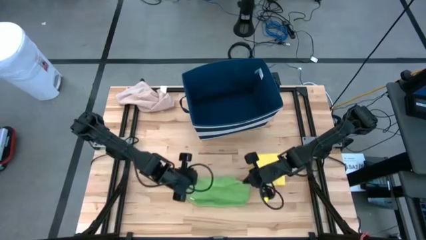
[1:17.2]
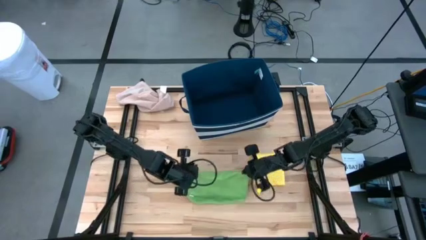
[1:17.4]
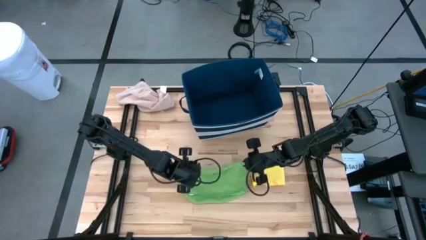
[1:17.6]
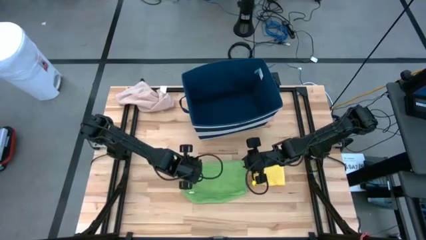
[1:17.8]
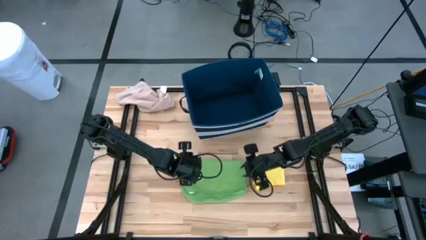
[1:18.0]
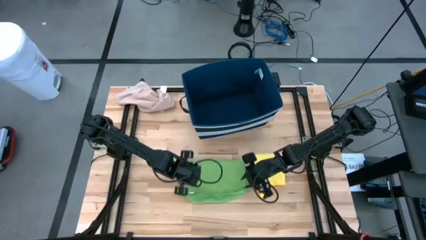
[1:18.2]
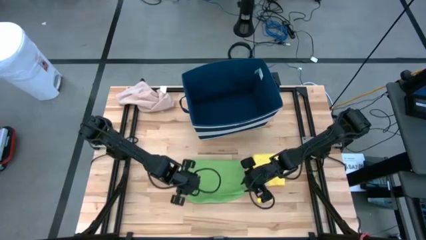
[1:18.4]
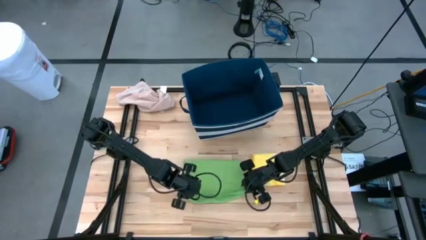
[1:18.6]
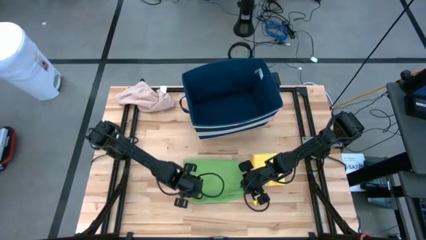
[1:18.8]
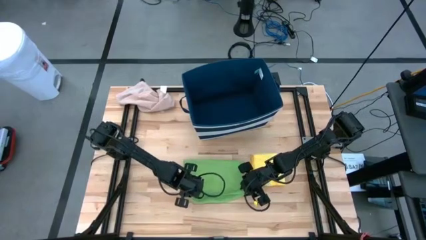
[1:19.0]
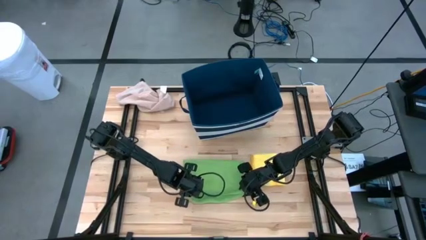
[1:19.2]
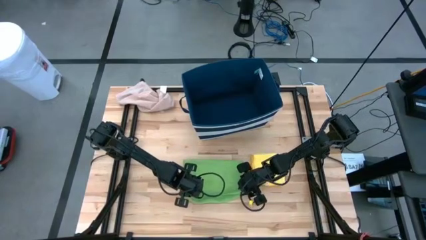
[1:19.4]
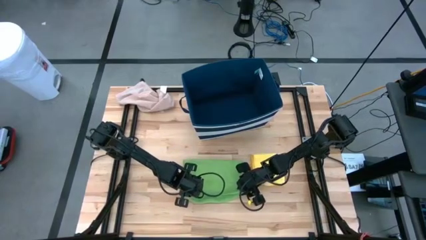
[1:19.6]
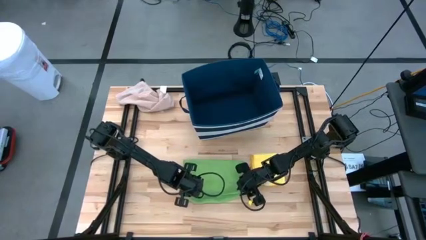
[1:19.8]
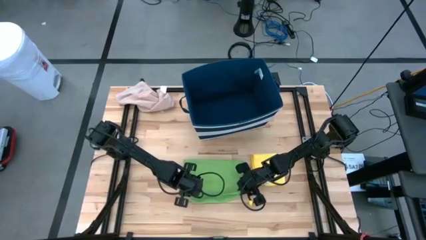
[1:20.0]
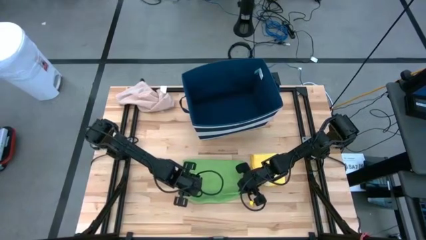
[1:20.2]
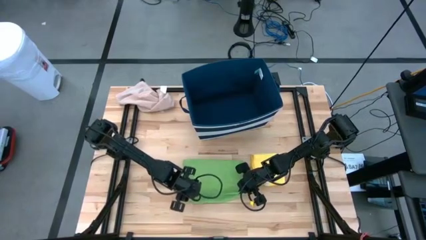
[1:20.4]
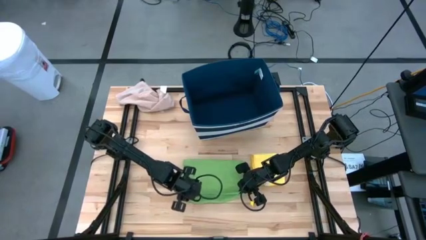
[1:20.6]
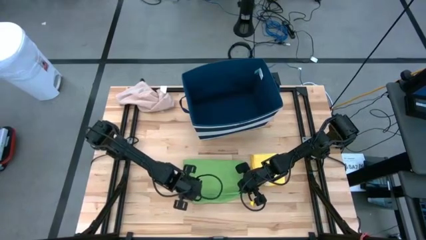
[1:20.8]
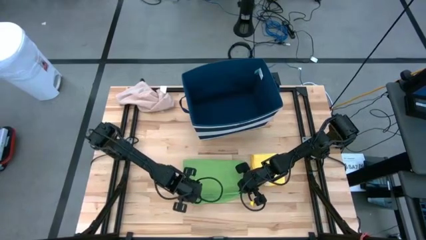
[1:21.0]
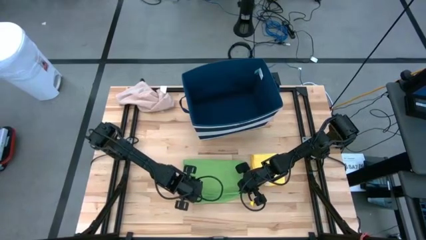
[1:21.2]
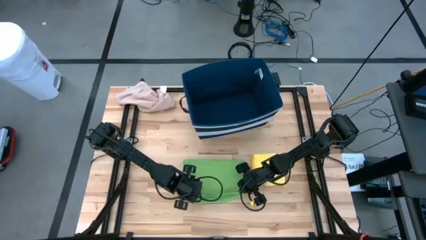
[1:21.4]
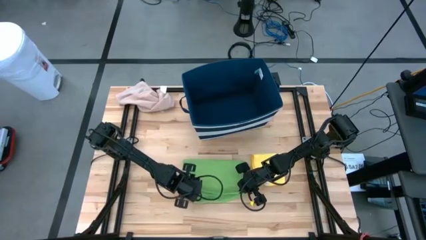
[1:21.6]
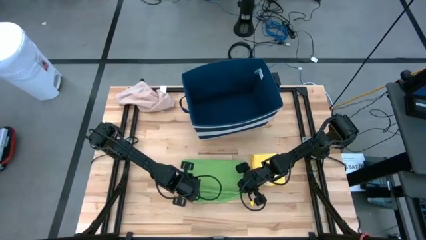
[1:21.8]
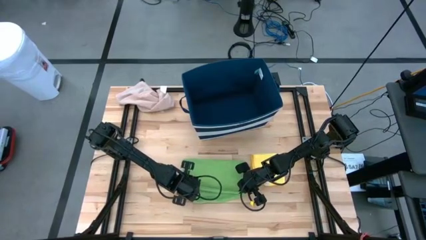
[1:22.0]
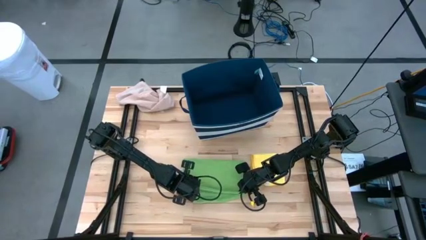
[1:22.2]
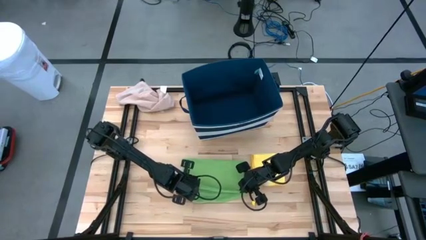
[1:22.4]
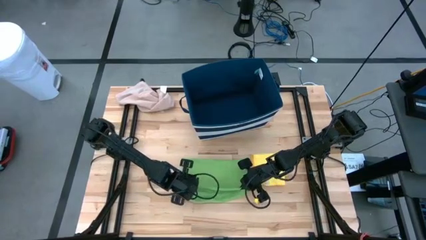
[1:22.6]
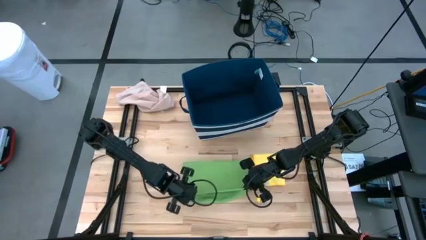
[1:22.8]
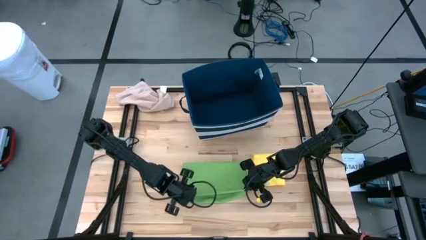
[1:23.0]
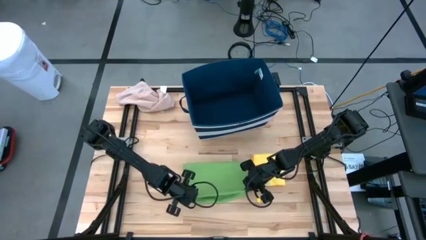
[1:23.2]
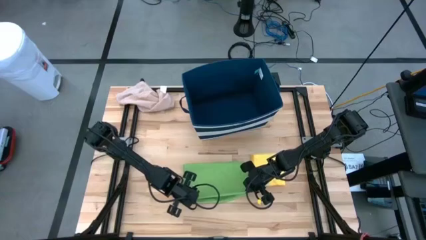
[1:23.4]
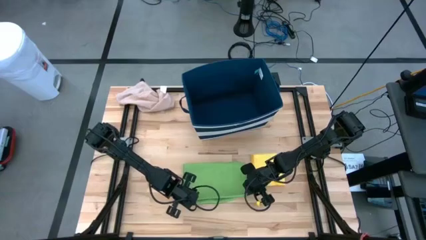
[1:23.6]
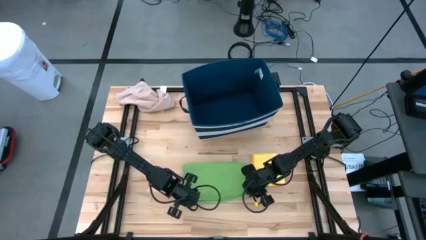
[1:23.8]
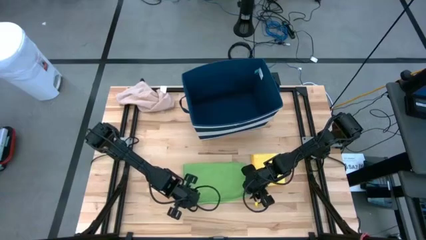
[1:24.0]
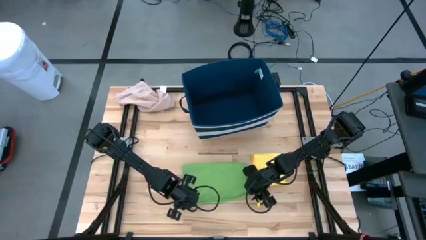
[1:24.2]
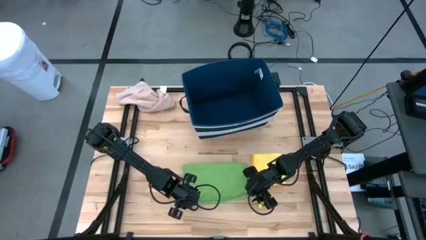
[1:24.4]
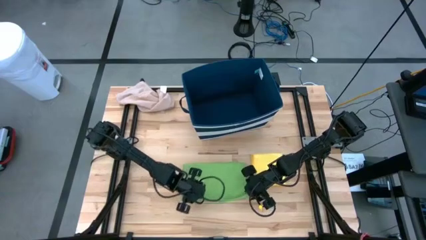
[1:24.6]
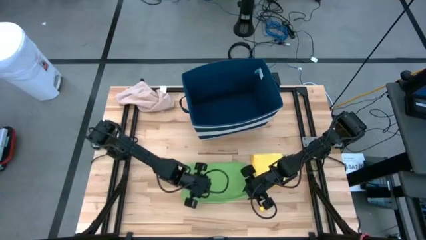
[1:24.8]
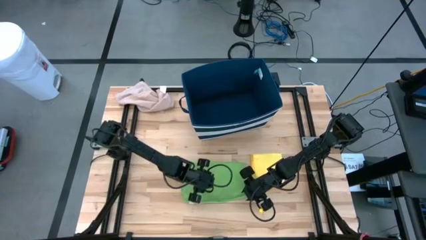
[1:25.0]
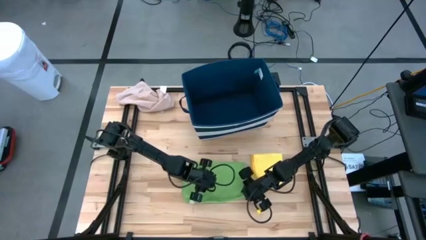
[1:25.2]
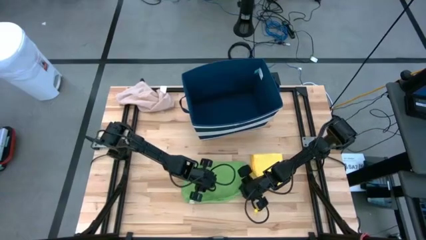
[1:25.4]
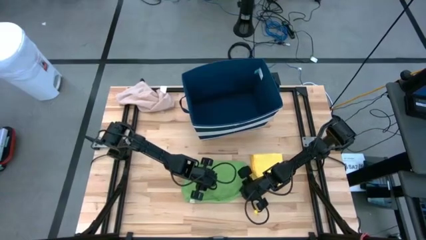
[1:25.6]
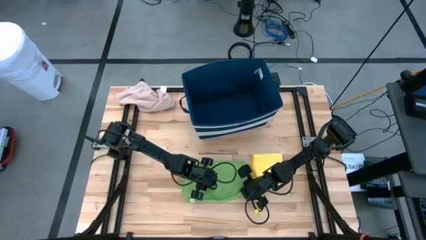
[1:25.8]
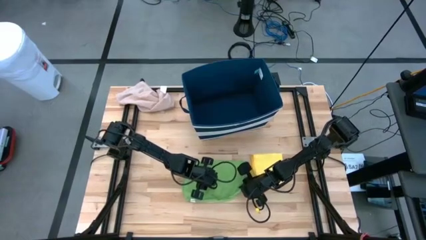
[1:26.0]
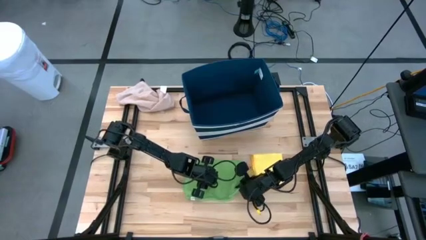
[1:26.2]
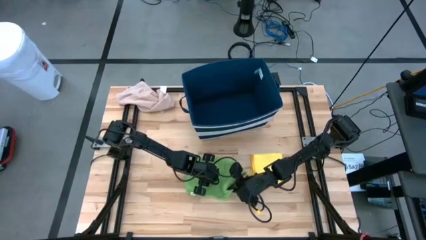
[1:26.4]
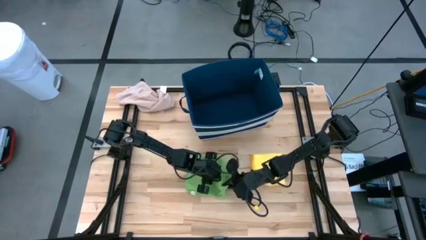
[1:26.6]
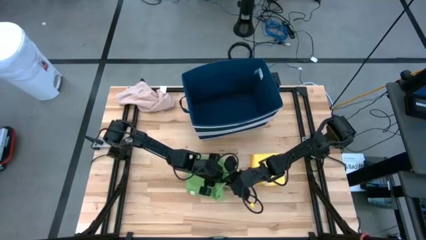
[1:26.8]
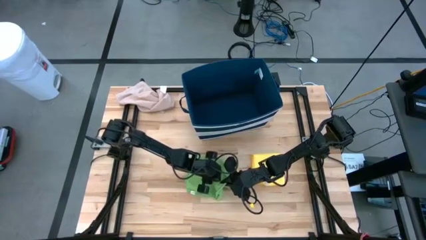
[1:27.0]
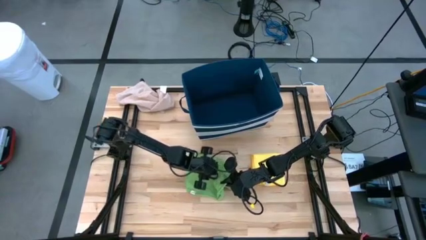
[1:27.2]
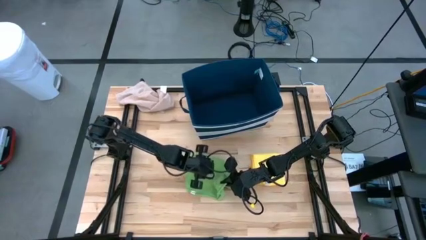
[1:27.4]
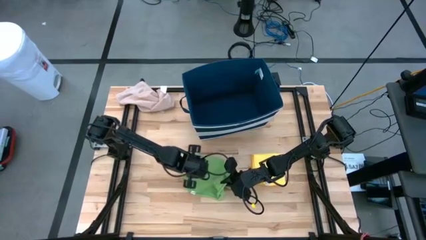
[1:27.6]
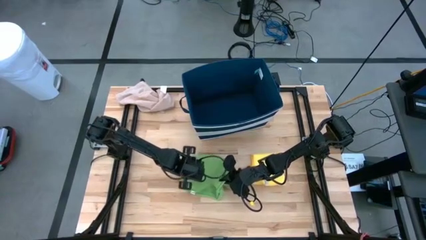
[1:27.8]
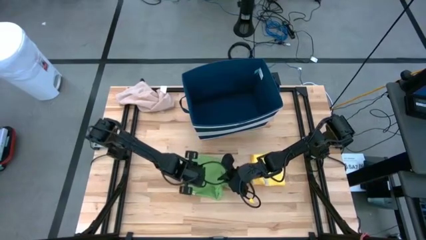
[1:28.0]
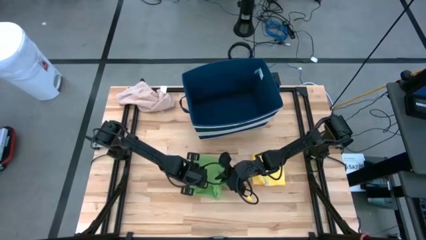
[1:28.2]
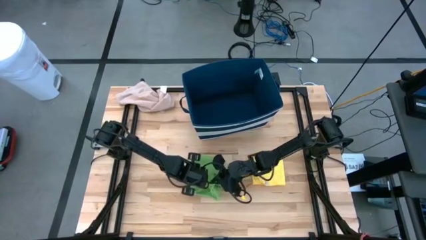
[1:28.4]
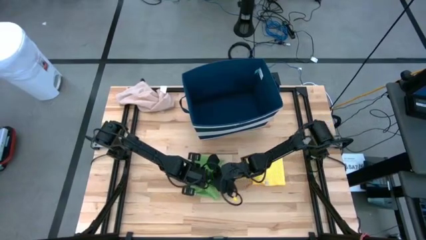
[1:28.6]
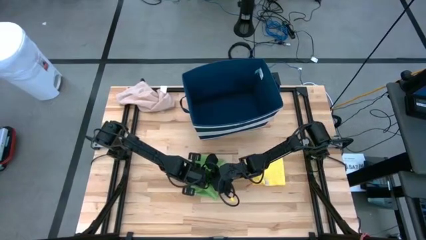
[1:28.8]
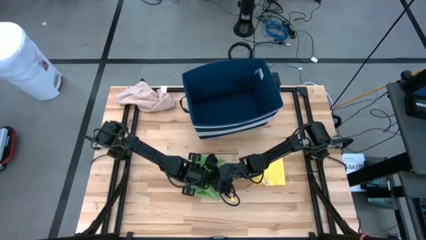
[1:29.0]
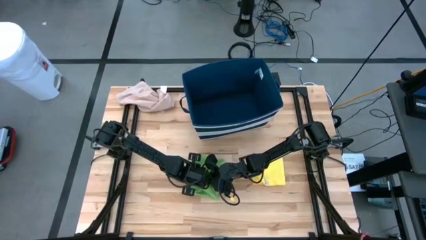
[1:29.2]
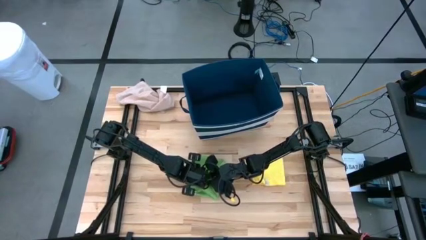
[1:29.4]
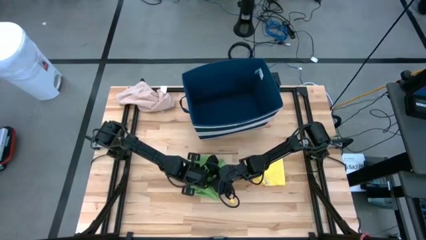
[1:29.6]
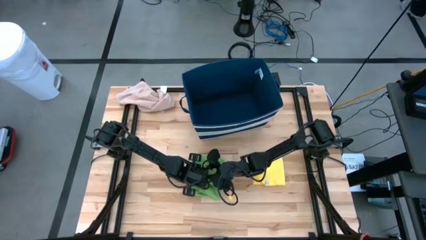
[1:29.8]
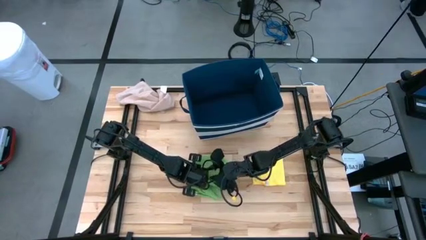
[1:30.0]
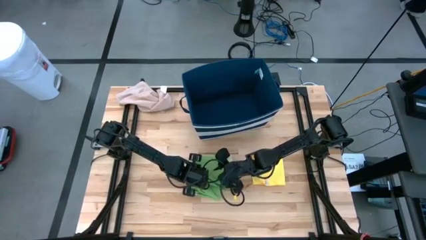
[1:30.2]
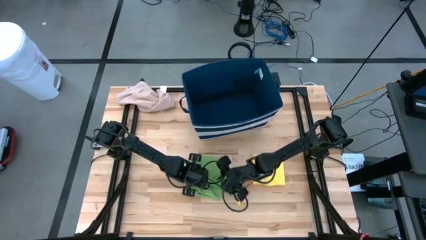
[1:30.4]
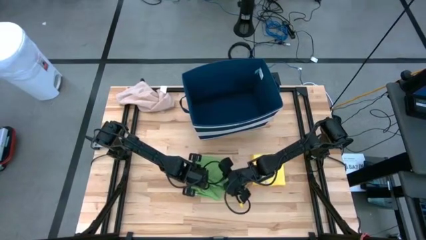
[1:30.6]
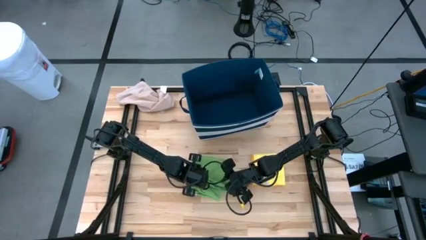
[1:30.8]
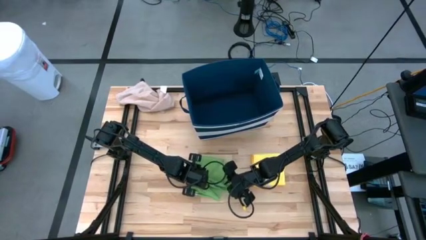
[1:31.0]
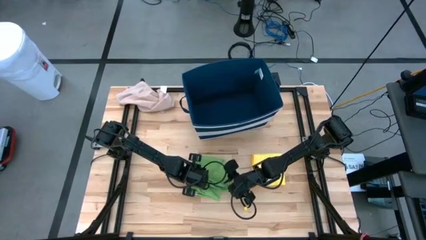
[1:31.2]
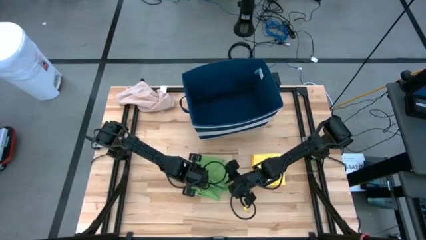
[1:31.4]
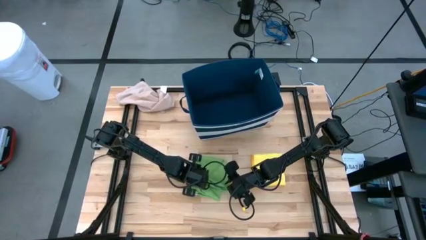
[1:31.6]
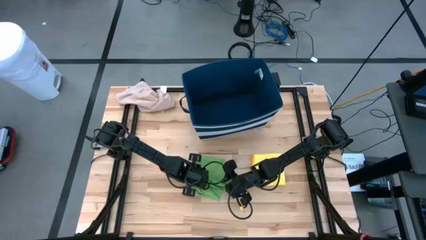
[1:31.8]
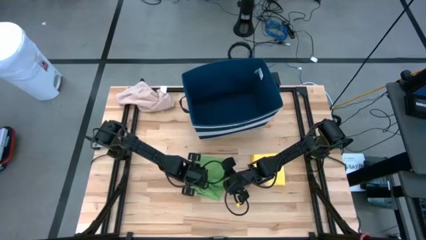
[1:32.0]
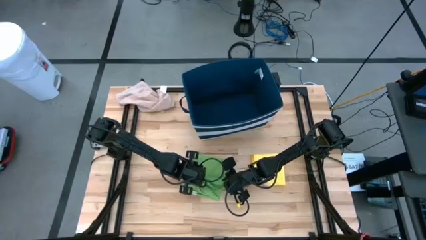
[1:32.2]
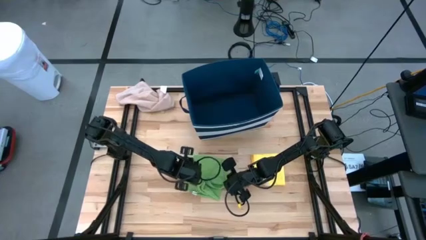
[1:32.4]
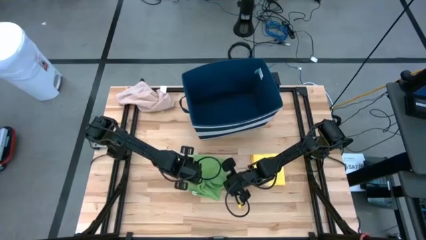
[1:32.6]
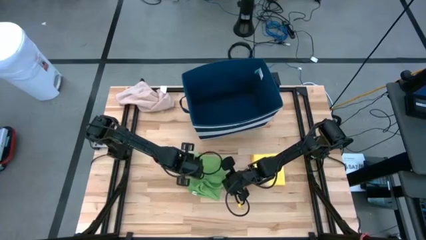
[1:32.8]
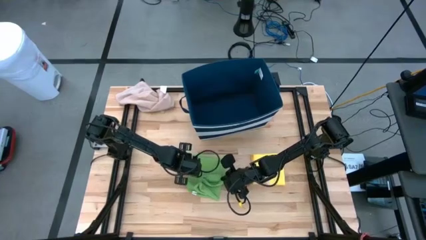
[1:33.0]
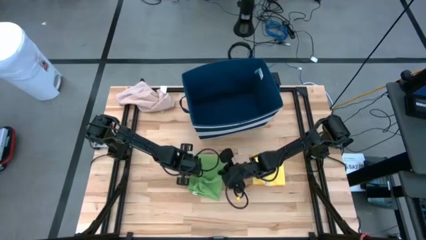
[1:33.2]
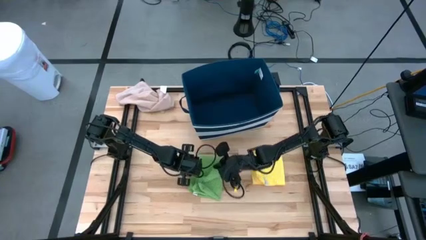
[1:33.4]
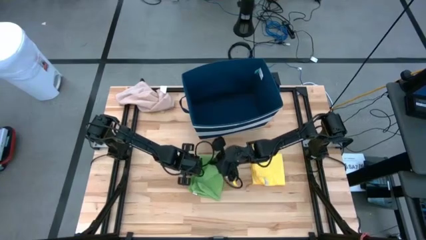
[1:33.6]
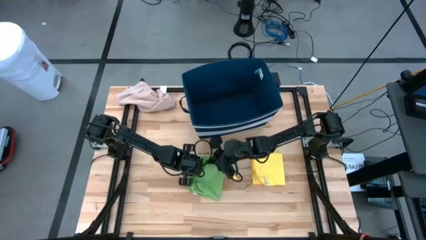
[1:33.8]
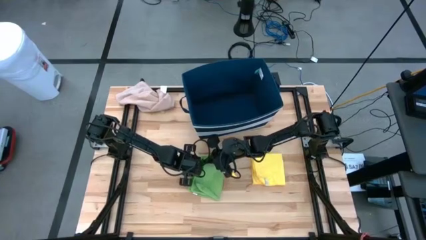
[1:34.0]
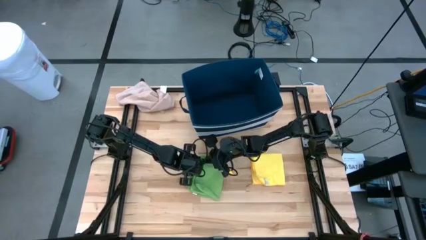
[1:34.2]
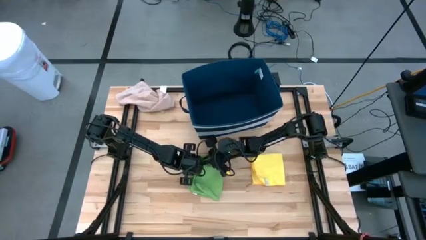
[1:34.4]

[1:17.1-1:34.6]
Task: Fold towel
Fold the green towel
